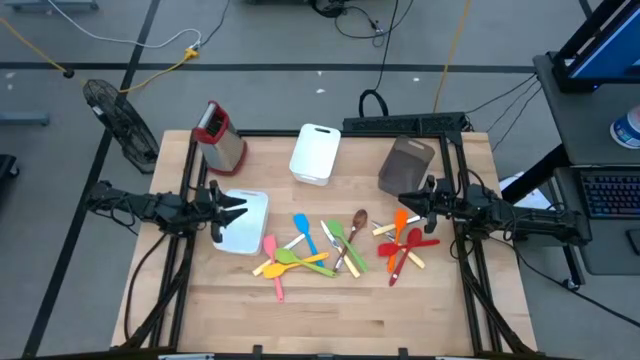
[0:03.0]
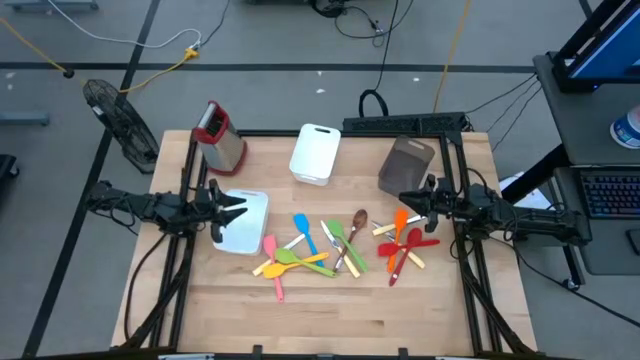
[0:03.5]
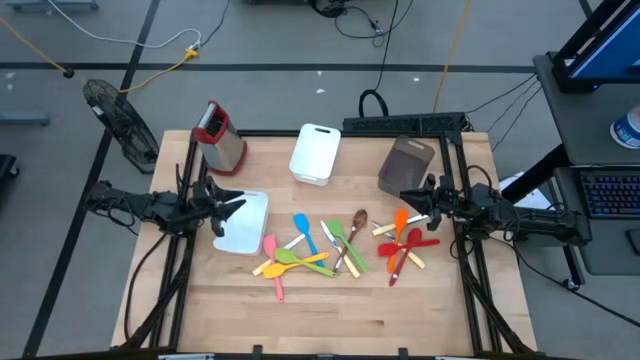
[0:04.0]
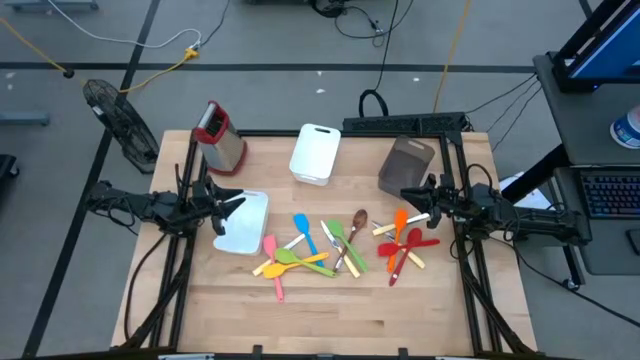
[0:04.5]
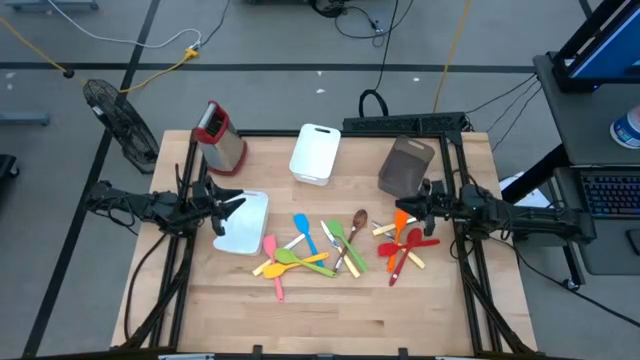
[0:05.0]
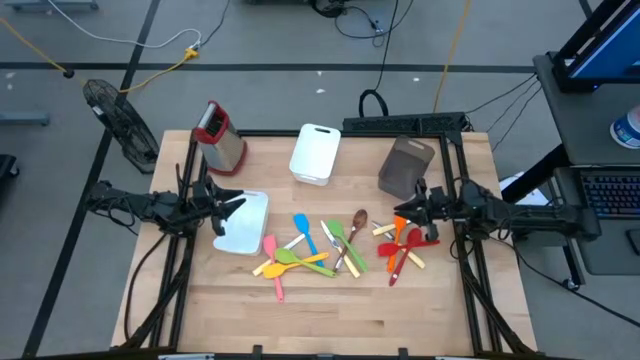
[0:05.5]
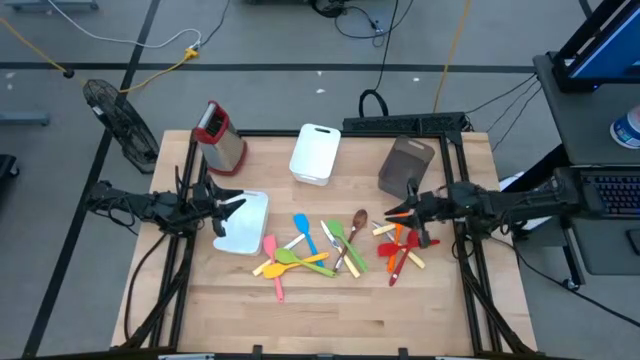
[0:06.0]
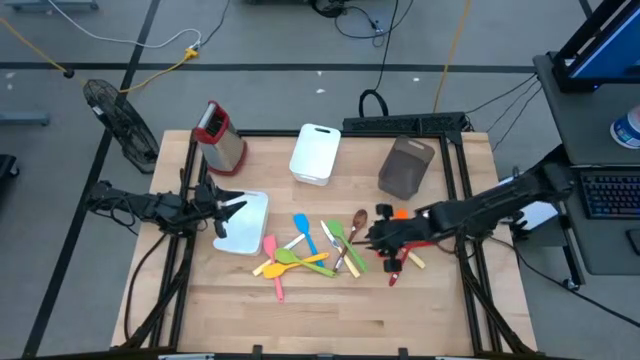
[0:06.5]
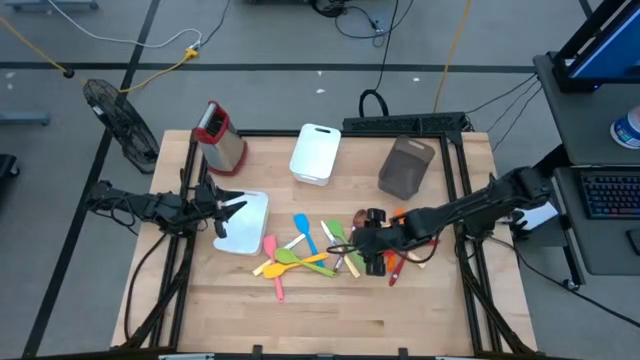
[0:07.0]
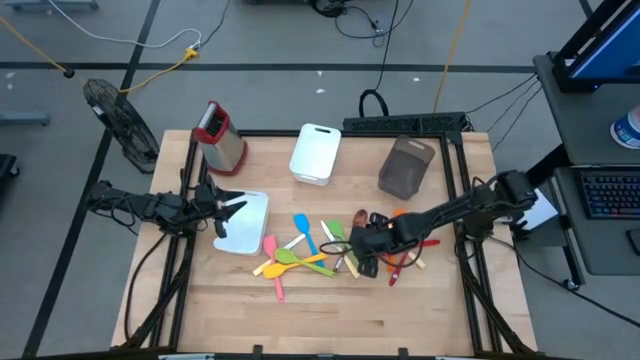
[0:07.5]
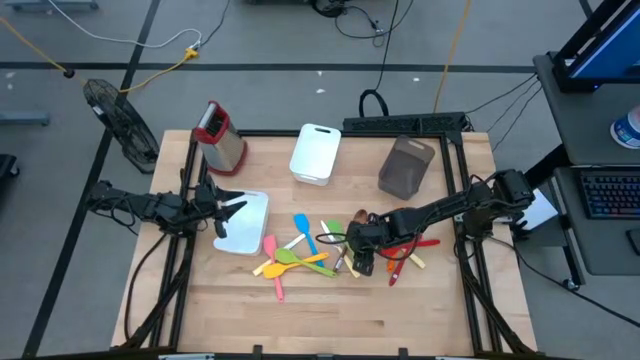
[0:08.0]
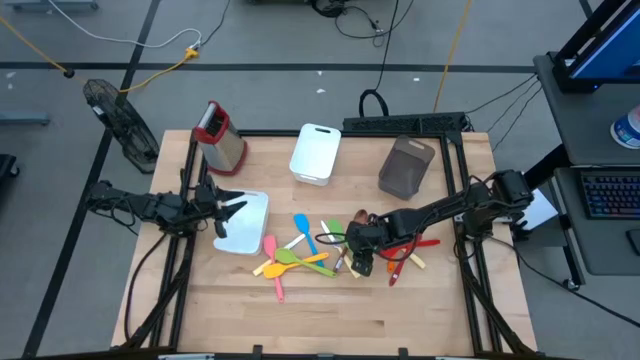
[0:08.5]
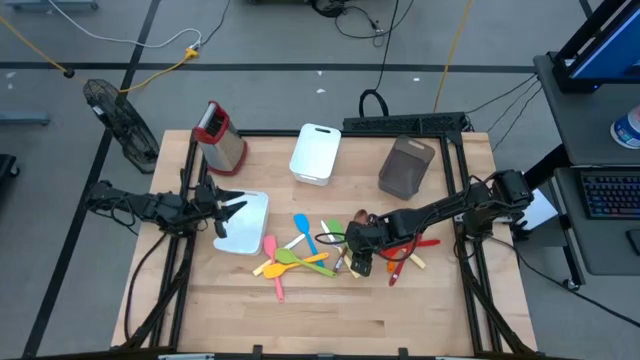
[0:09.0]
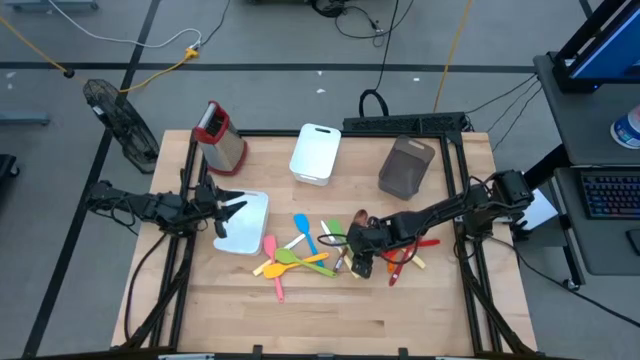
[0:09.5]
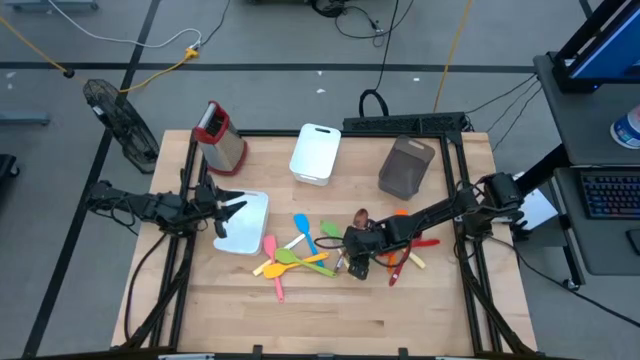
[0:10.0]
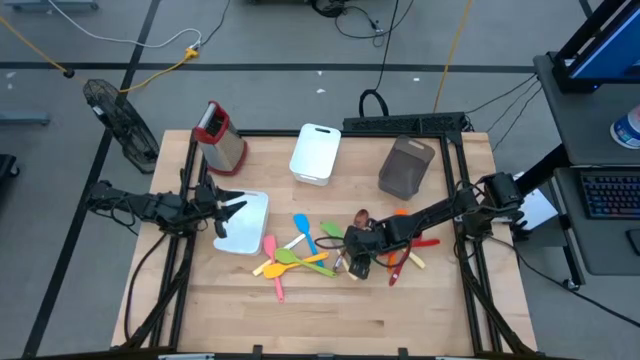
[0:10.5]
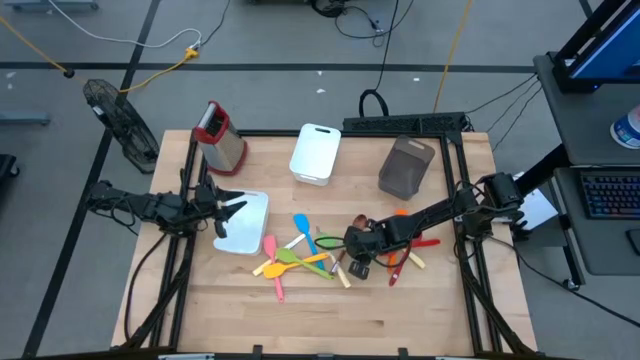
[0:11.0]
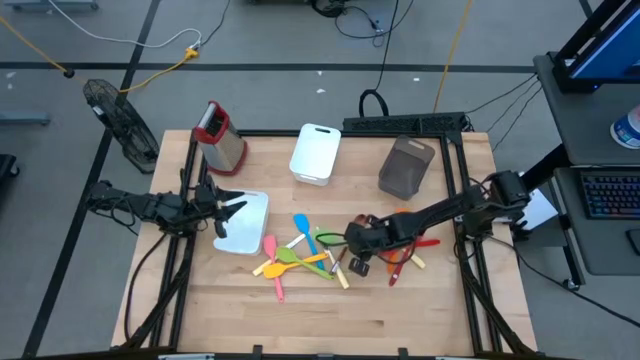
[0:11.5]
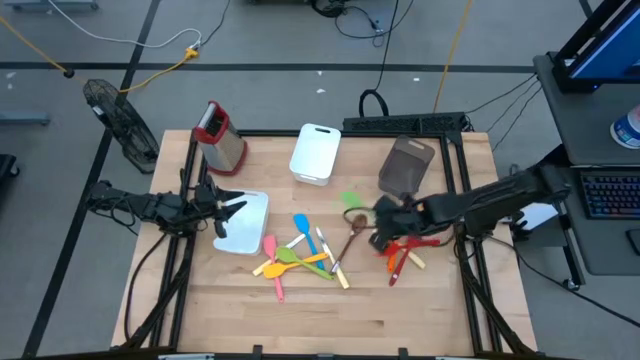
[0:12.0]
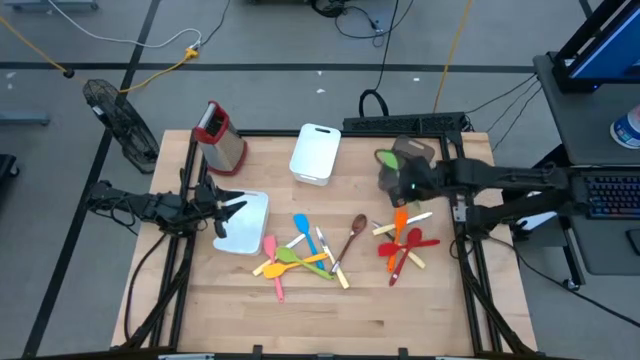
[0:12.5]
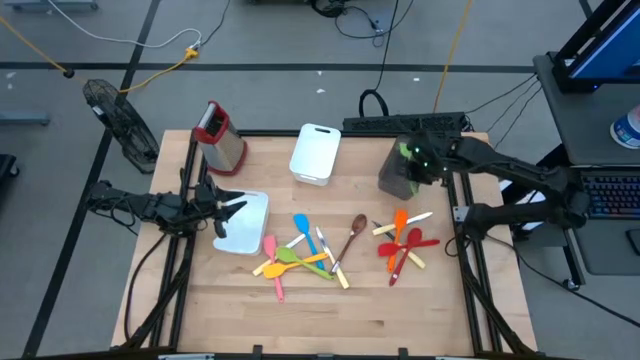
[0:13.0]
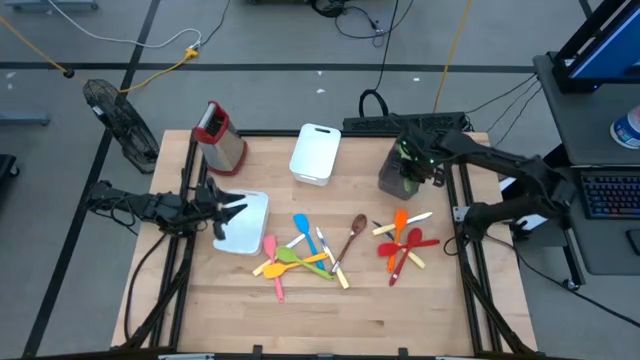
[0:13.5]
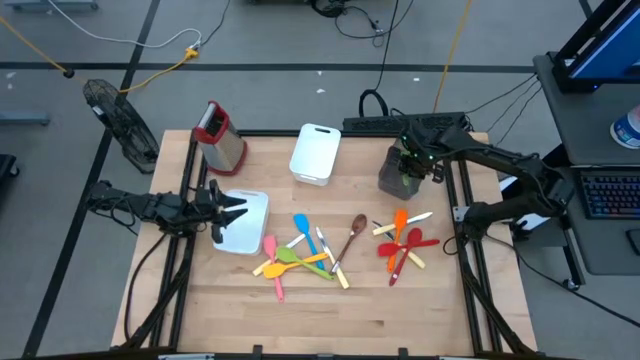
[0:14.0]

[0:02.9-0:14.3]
Task: Pick & Place Kitchen Items
Put the green spatula into the black bin

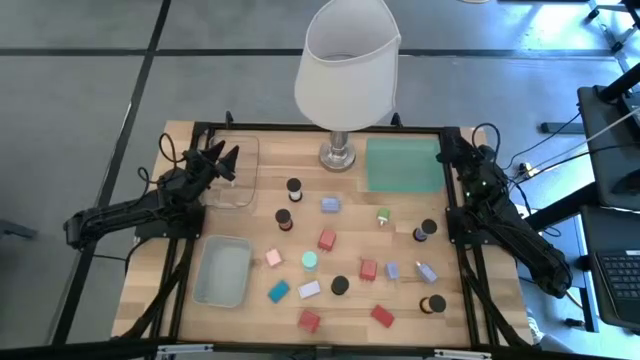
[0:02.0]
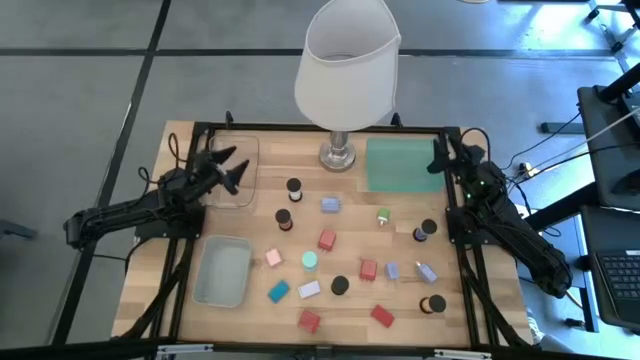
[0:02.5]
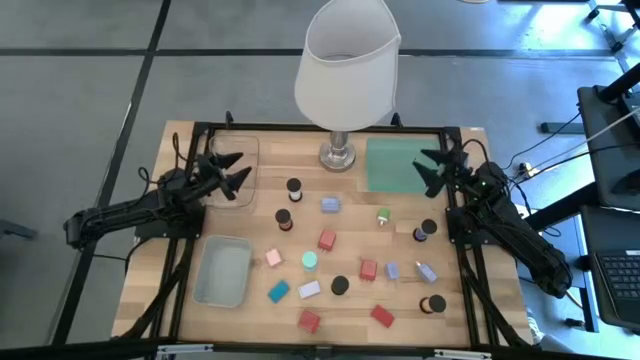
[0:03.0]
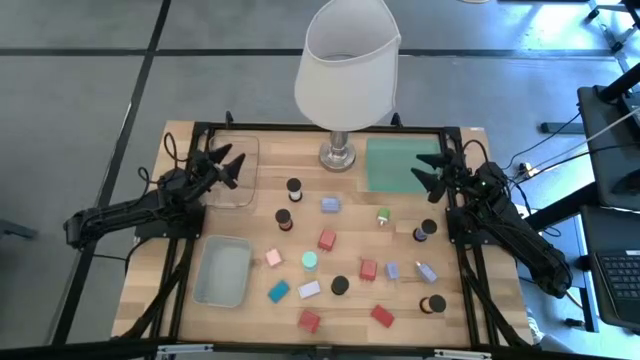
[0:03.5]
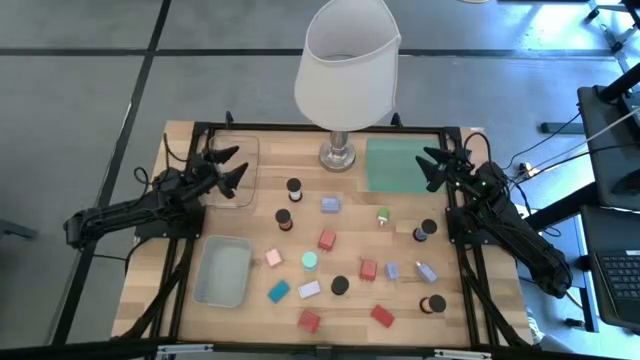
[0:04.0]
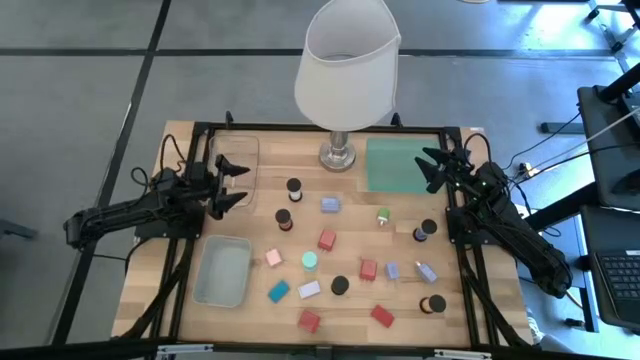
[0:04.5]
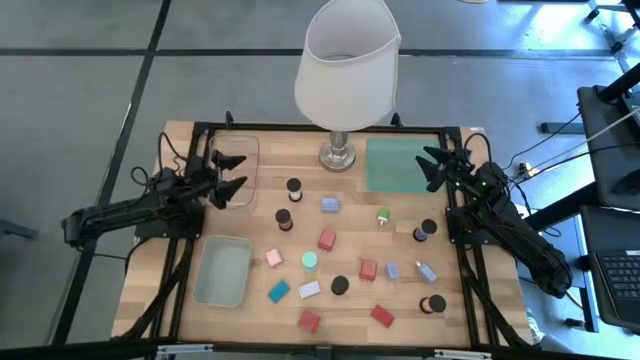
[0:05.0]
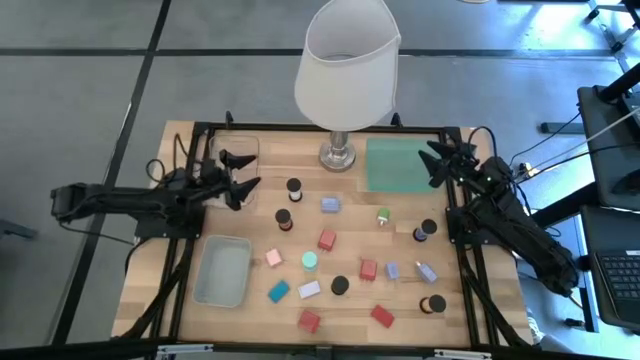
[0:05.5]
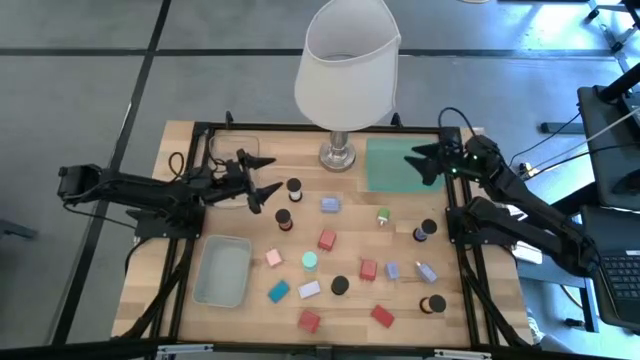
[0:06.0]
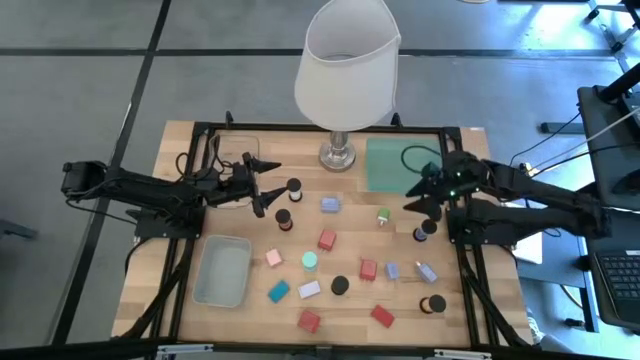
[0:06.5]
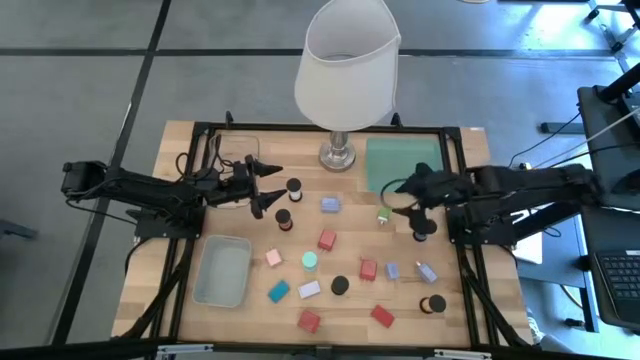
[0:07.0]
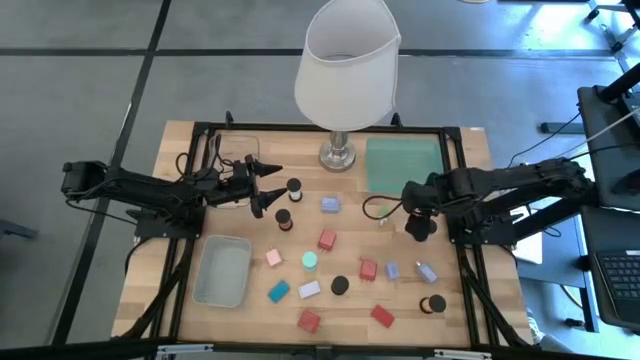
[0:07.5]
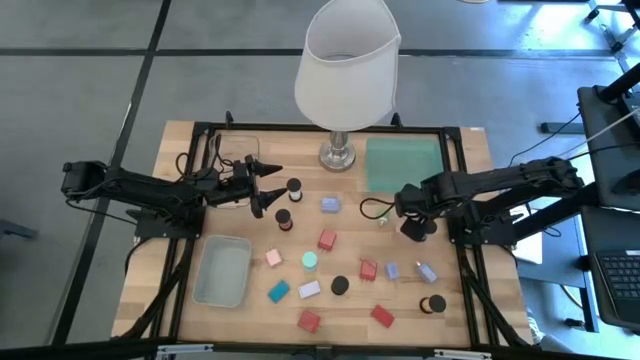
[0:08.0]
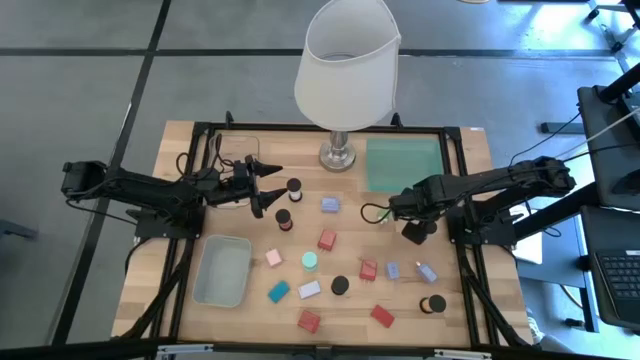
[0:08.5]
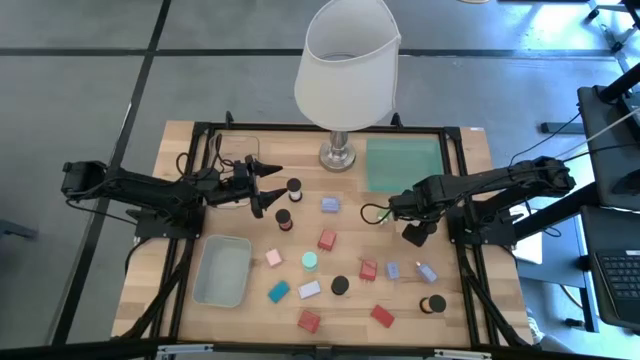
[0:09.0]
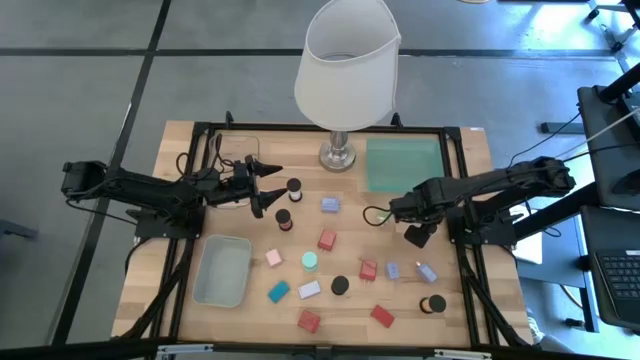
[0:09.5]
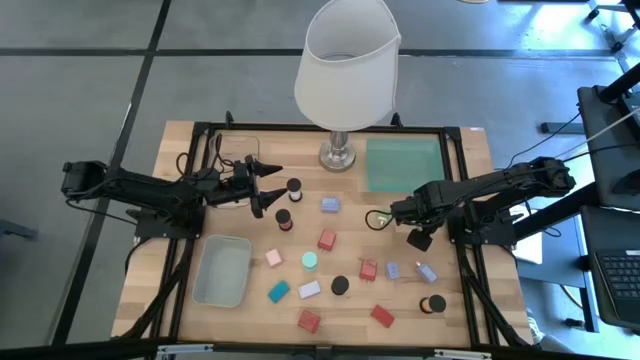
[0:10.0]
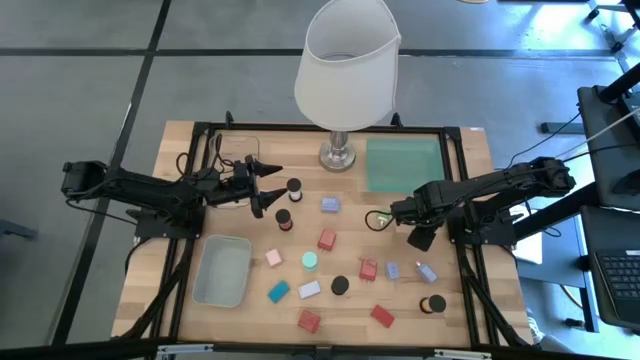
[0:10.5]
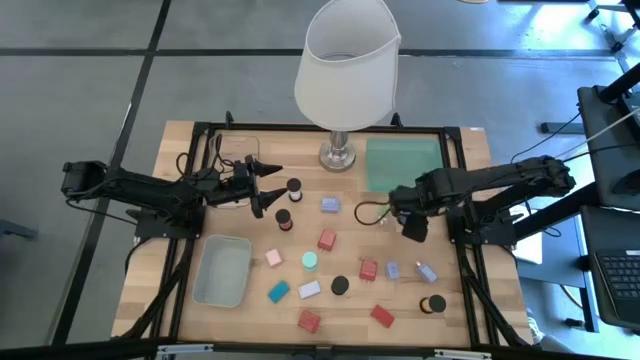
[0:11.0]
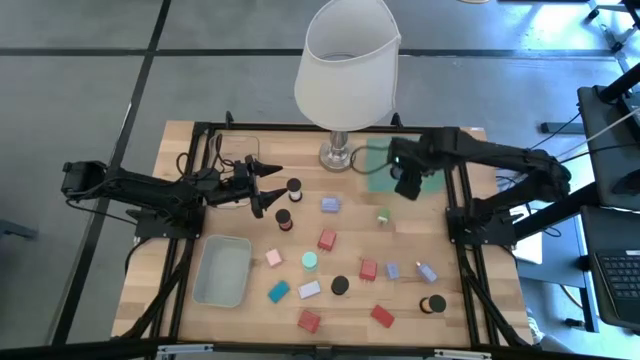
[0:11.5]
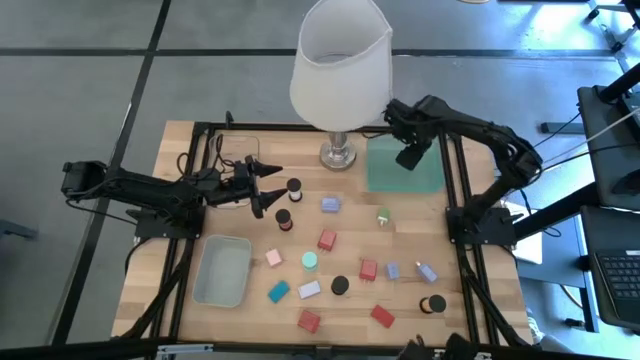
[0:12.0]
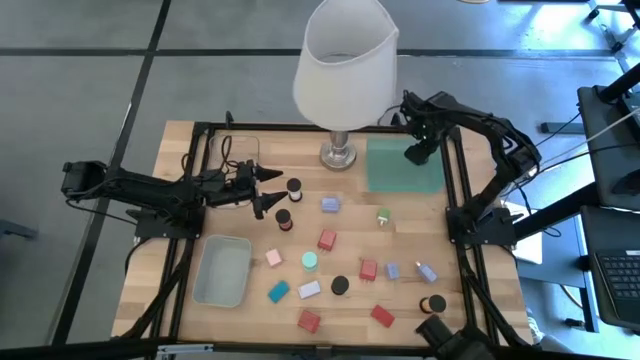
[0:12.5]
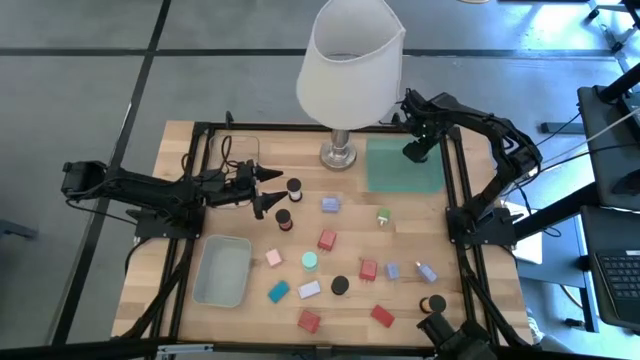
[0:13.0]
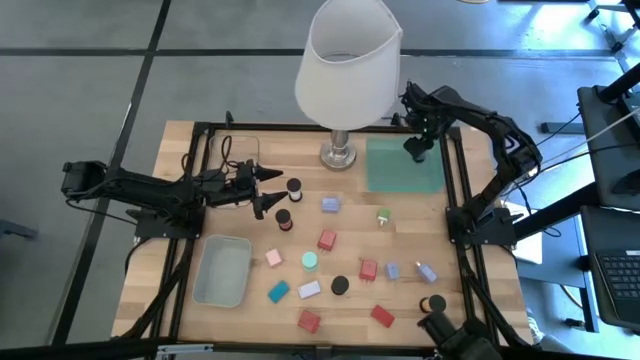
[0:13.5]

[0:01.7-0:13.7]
Task: Pick & Place Office items
Put the violet hourglass into the green bin
